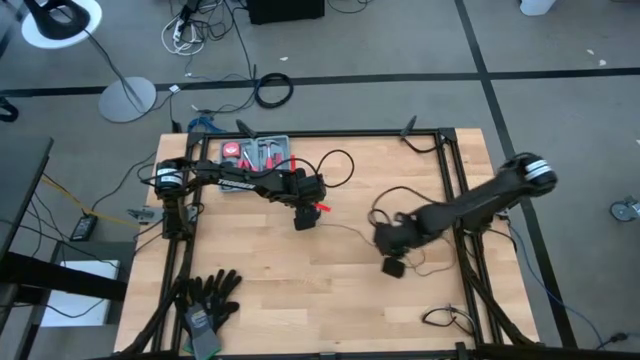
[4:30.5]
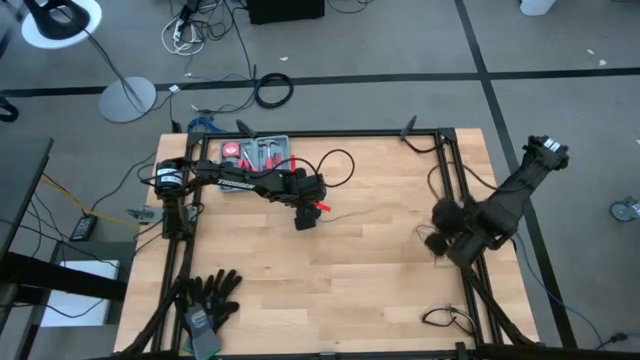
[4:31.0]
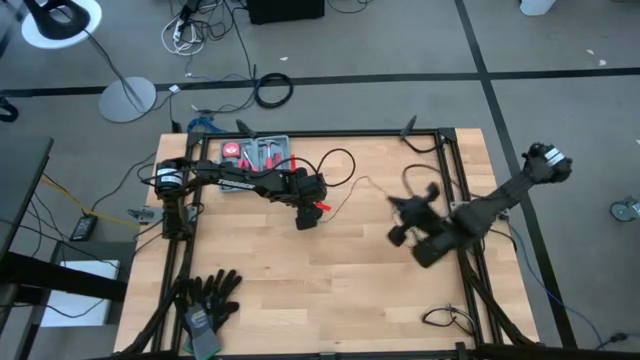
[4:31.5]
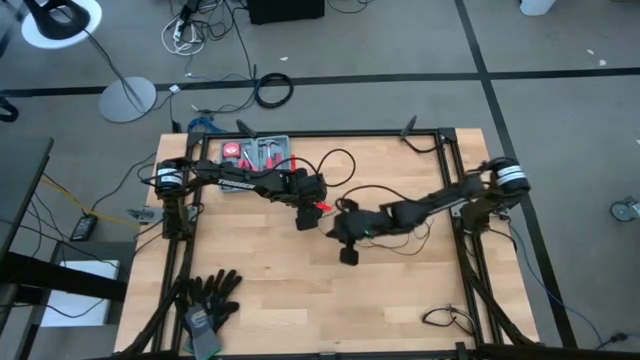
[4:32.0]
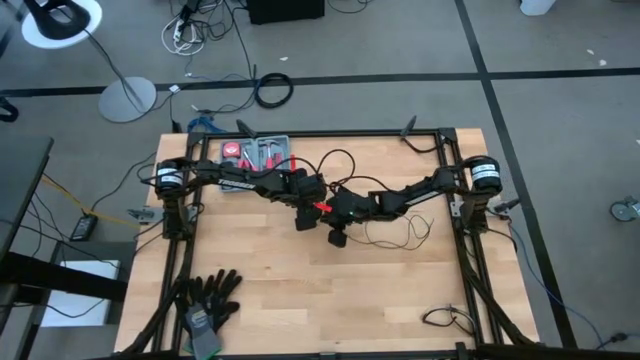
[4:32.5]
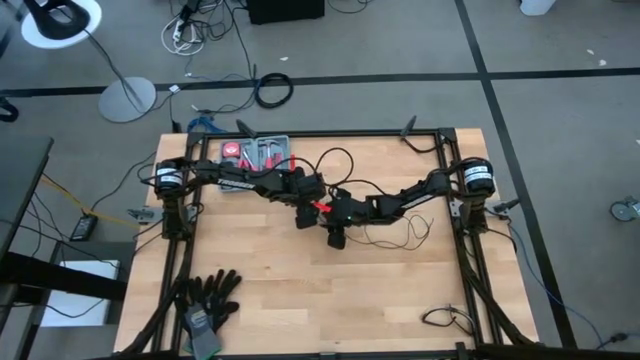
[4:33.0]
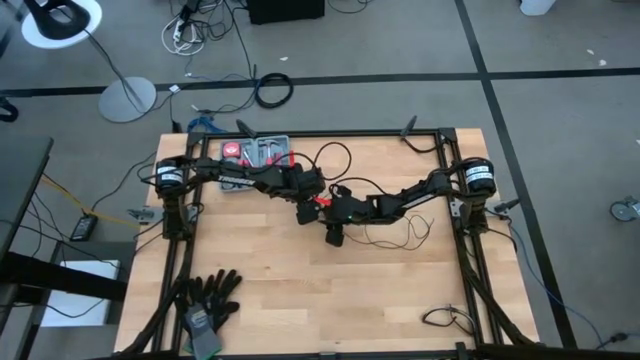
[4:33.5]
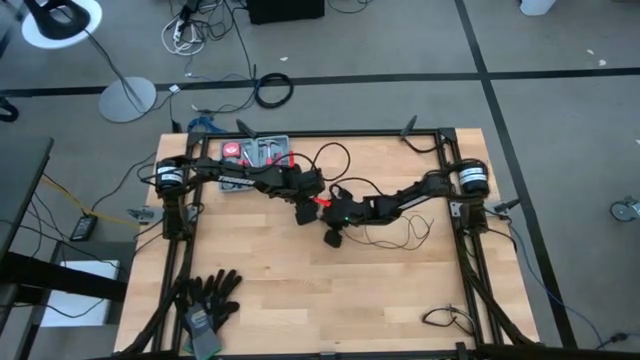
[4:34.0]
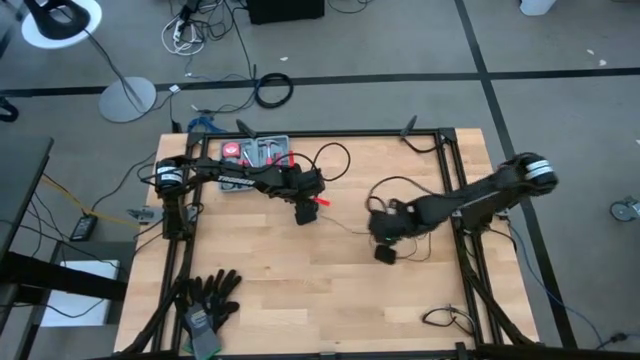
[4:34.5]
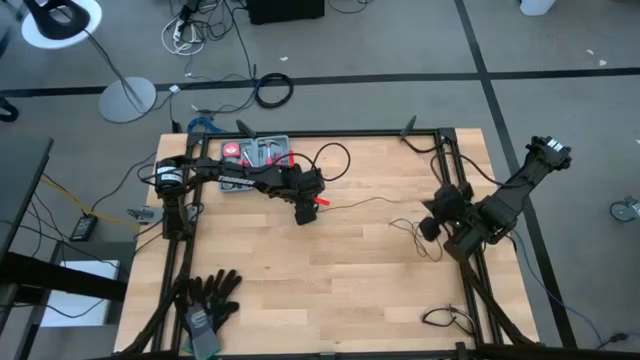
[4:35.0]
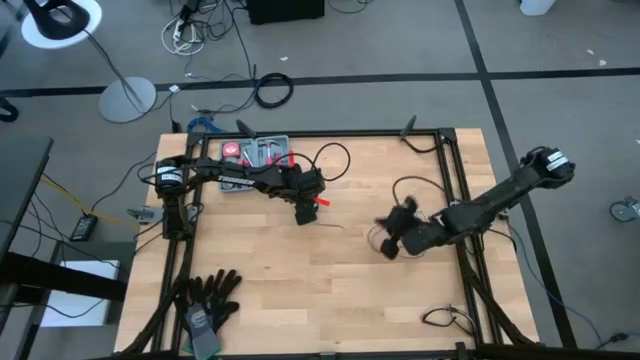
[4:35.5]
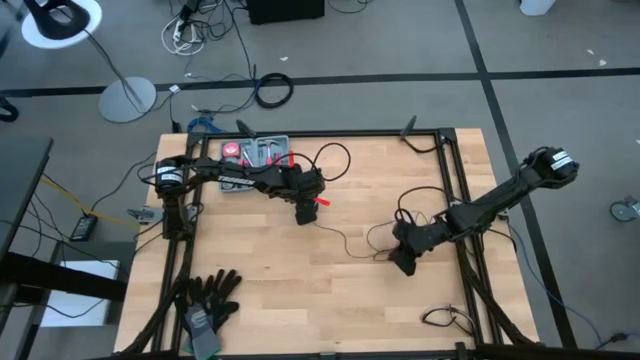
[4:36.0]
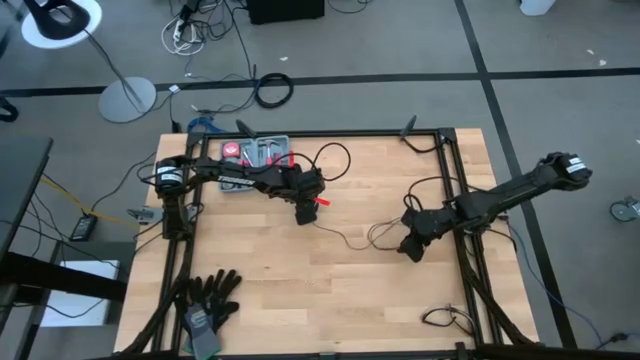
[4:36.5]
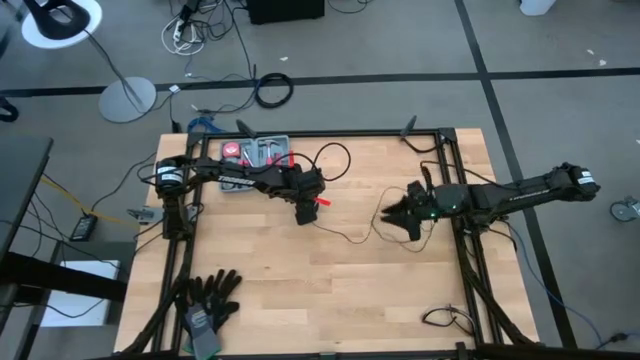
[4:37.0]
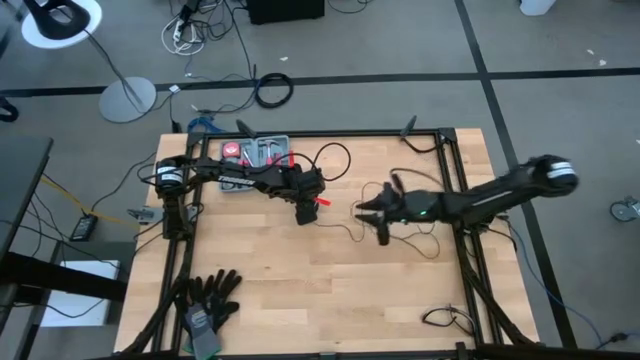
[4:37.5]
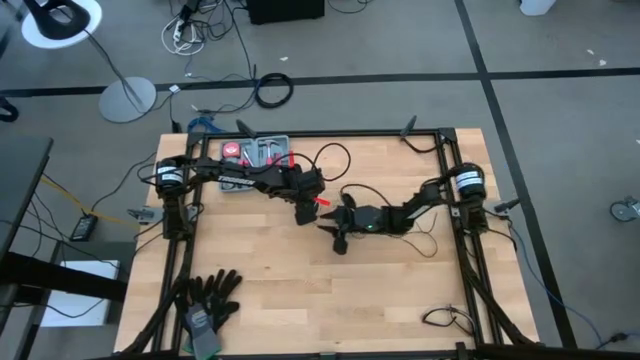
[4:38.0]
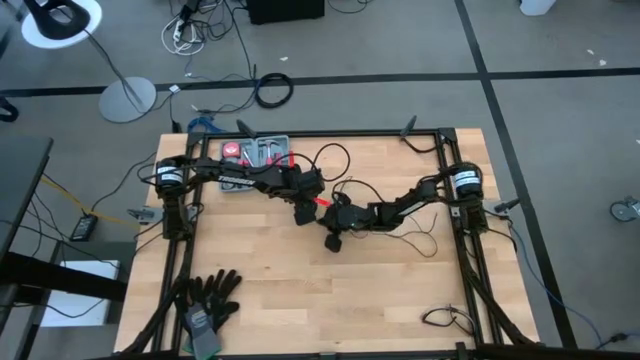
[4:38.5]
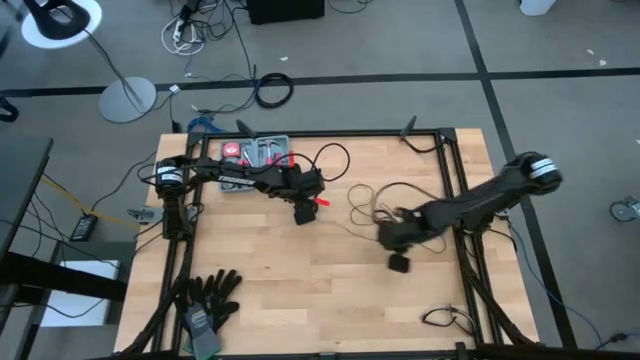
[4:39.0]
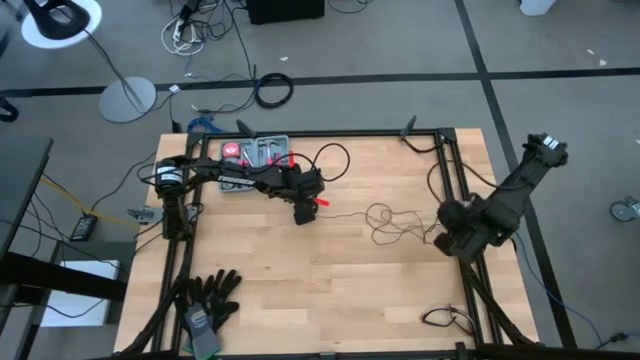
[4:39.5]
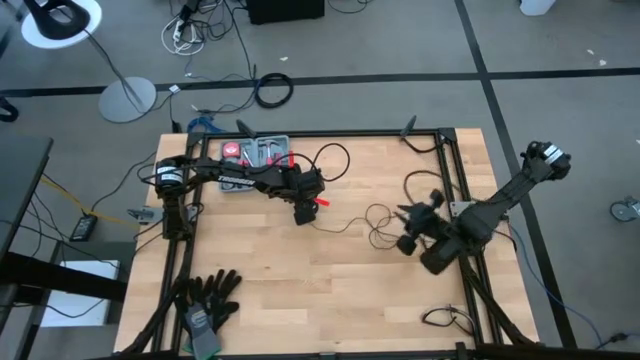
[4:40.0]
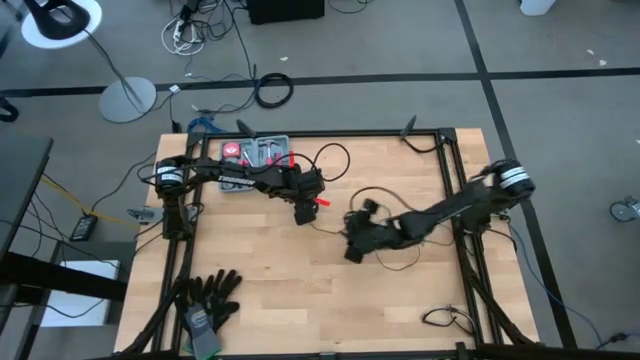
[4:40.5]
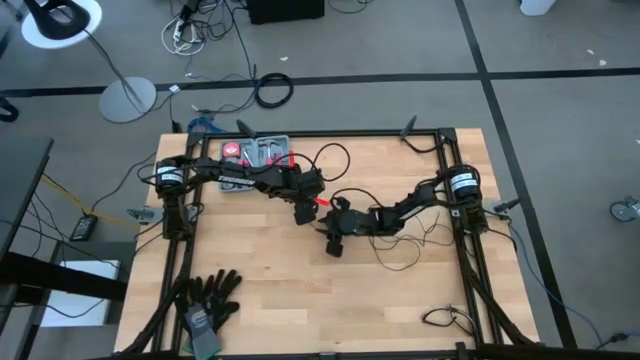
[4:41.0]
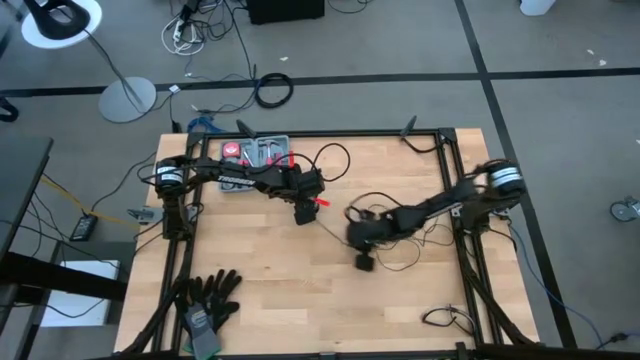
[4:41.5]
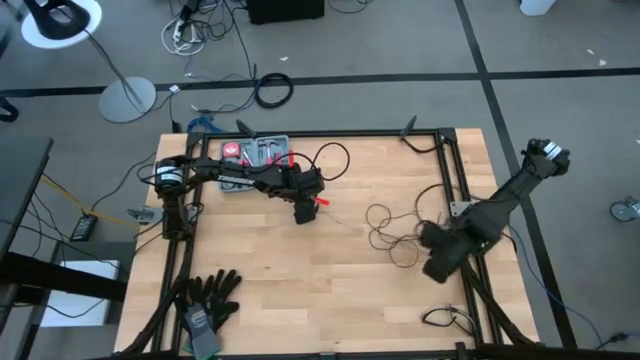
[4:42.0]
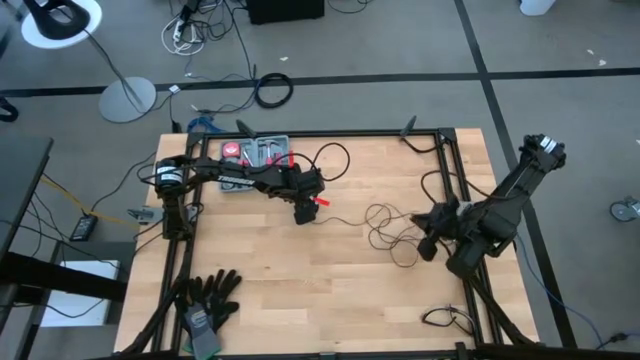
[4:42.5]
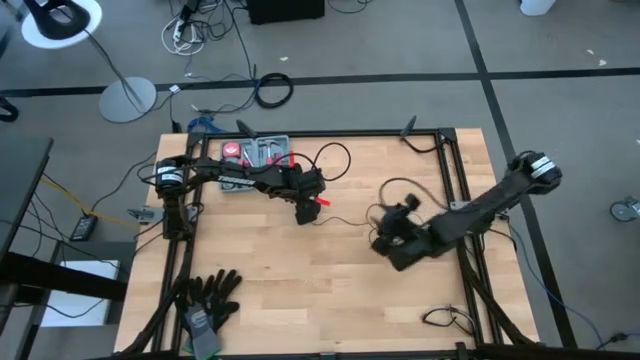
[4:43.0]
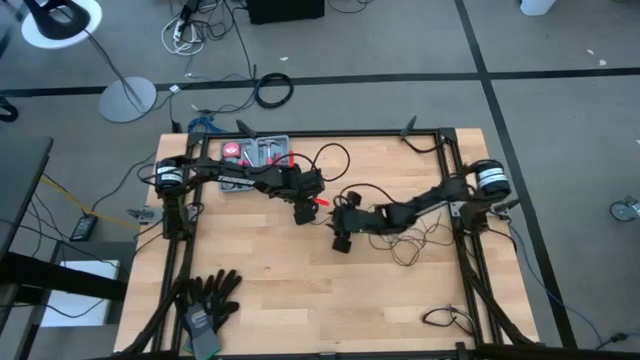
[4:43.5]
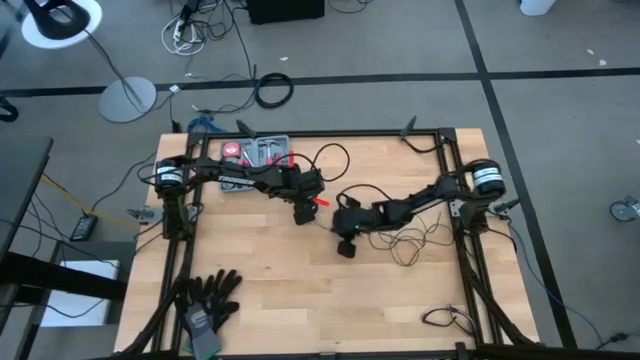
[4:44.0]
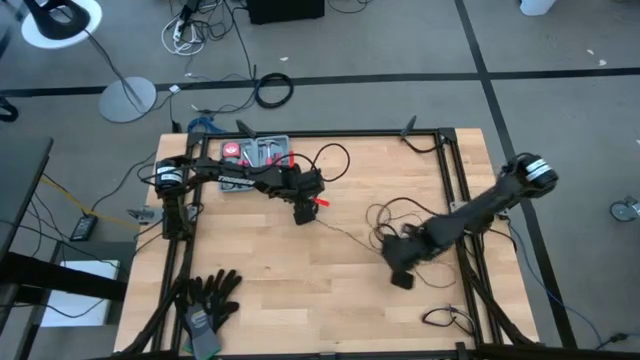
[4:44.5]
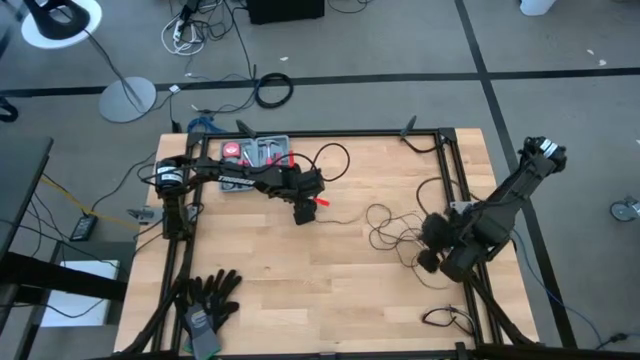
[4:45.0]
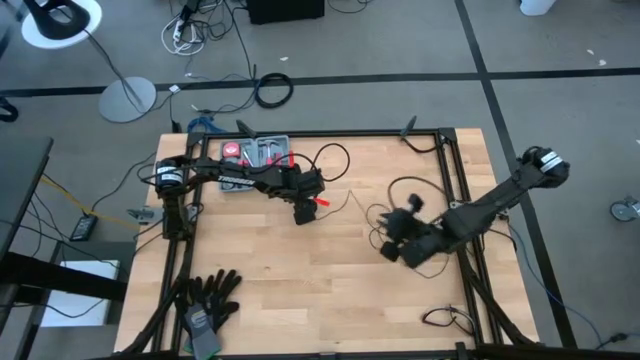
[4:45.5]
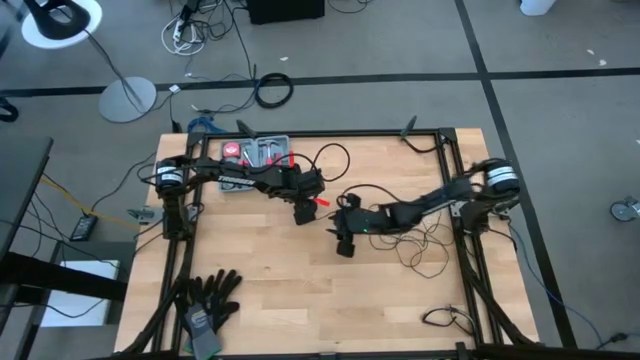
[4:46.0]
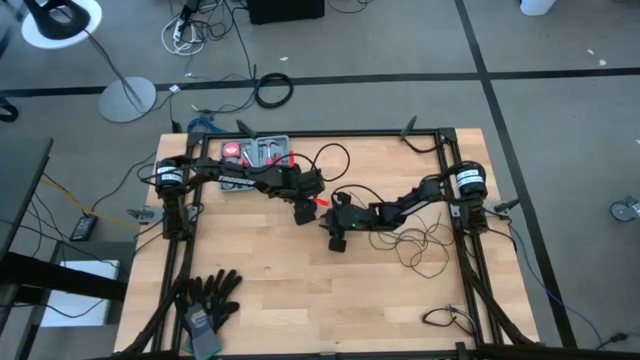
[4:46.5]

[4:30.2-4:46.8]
Task: Coil cords
Uncoil the black cable wire from the spool

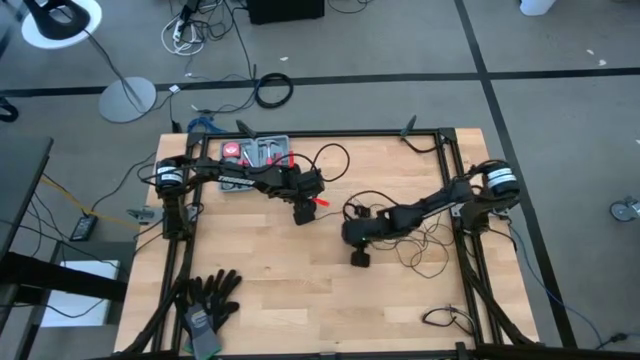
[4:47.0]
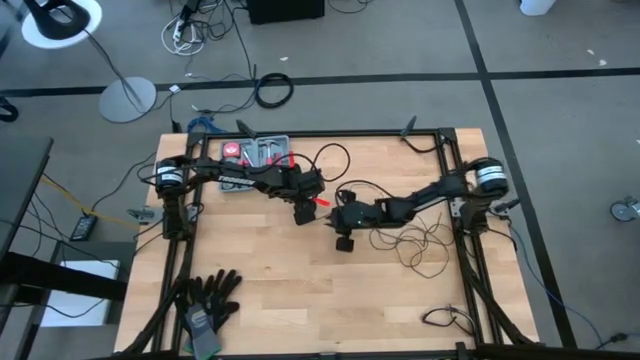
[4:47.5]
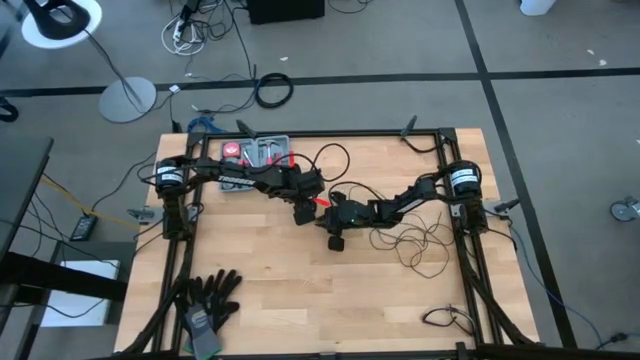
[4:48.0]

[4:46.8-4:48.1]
Uncoil the black cable wire from the spool

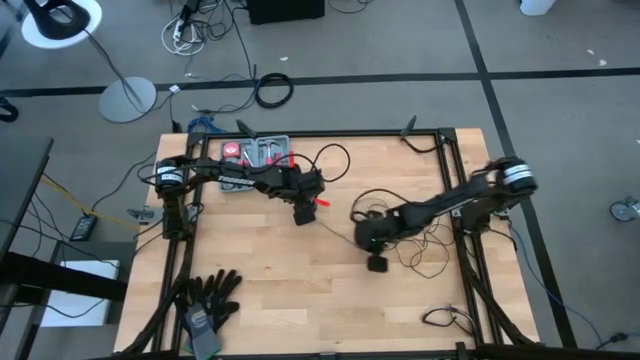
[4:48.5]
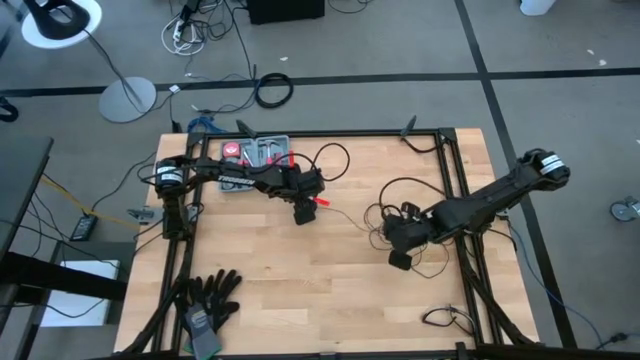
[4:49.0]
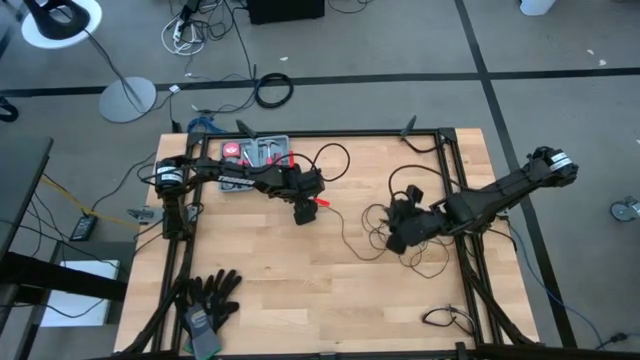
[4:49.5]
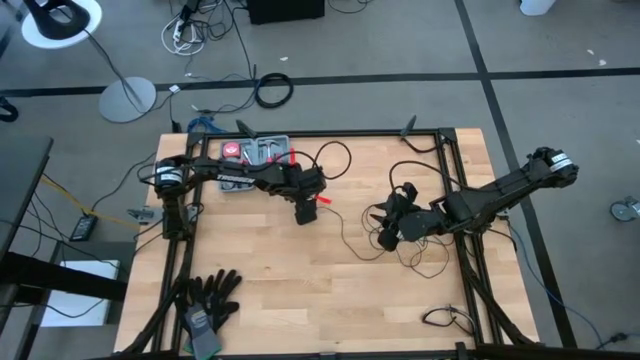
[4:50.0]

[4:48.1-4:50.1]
Uncoil the black cable wire from the spool
